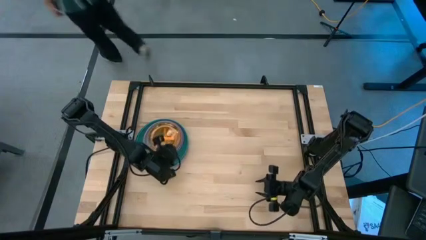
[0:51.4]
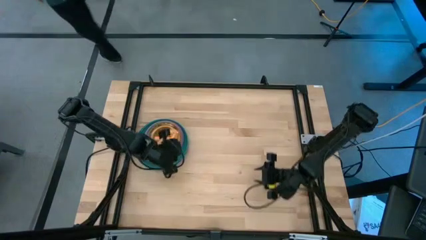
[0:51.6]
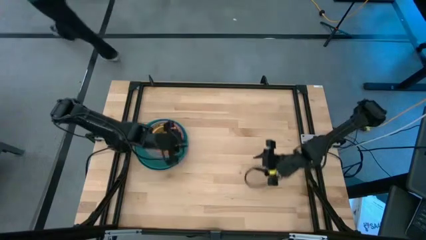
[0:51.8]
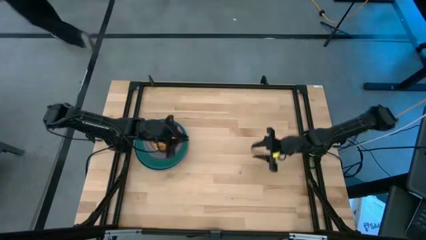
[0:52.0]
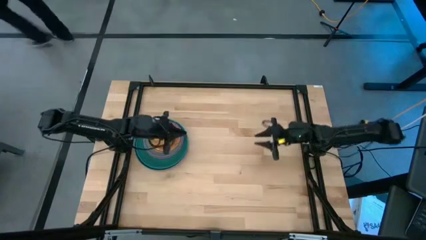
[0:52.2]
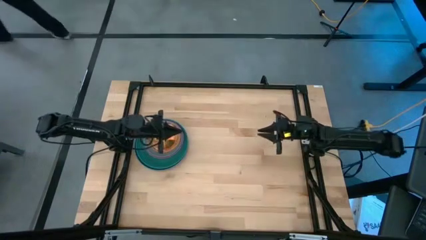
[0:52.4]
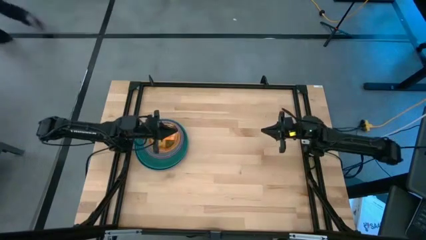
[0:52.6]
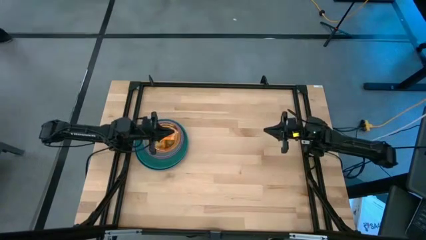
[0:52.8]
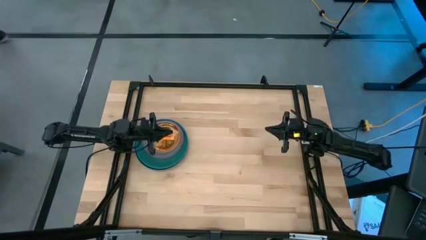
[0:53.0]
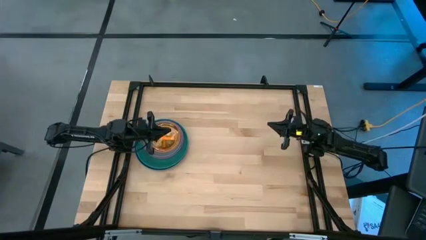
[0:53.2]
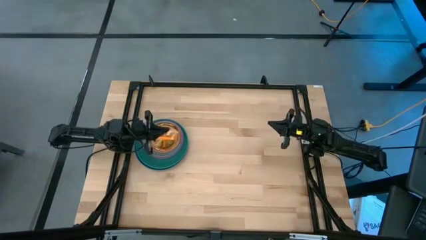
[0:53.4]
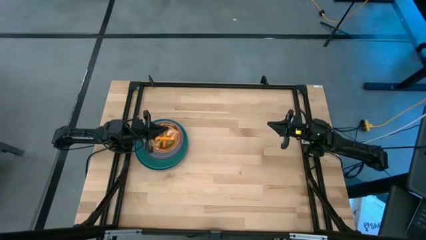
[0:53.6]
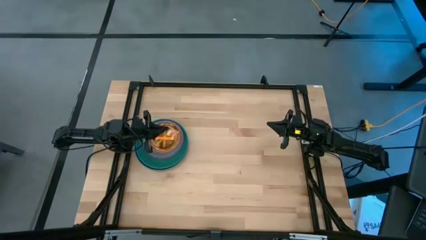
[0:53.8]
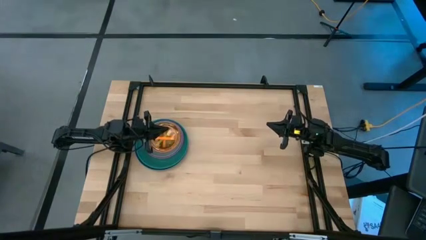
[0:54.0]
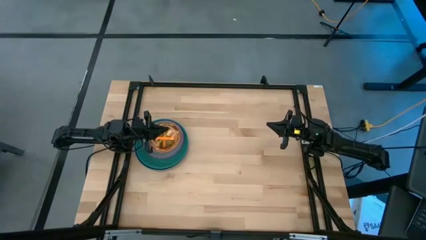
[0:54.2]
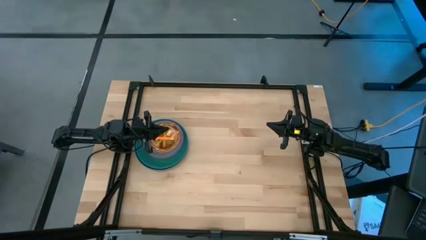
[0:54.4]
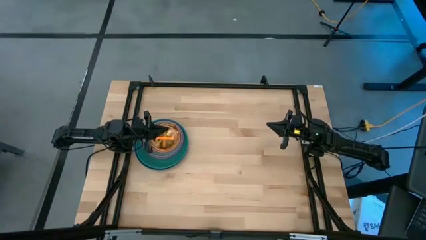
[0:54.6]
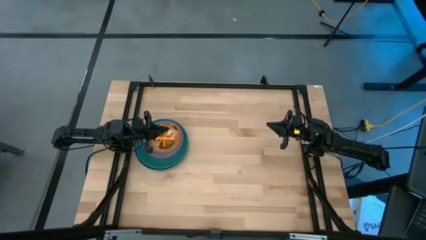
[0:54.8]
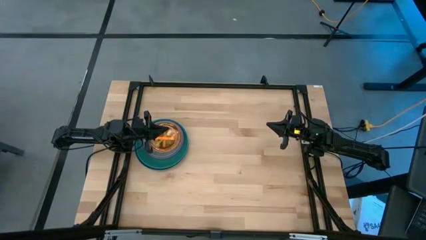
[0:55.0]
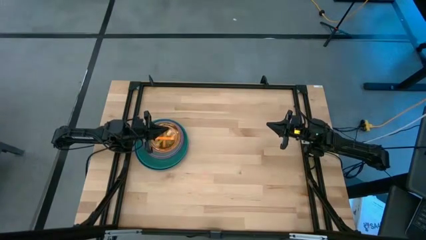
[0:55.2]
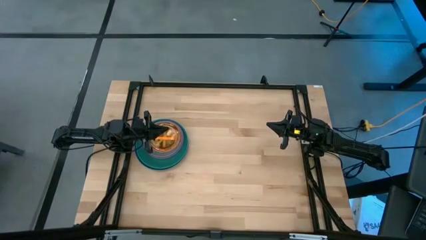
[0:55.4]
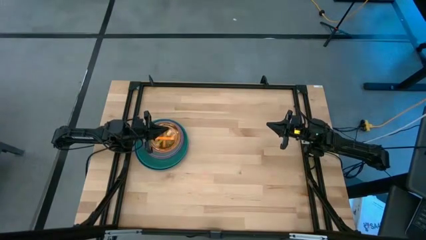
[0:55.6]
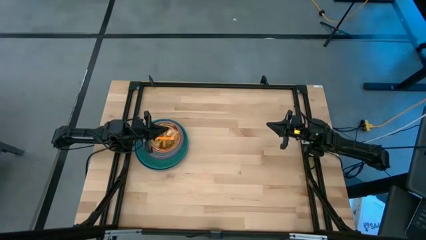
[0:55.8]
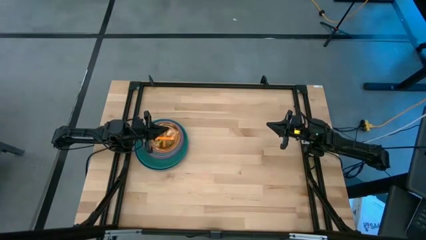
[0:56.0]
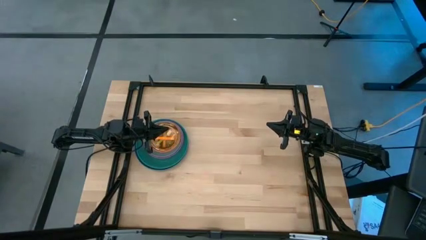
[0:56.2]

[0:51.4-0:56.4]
Task: Stack plastic plates
Return to Home Position

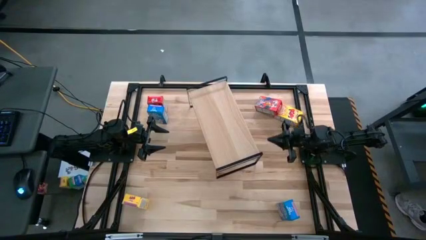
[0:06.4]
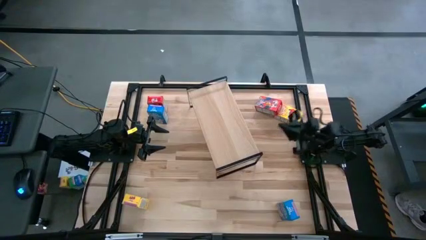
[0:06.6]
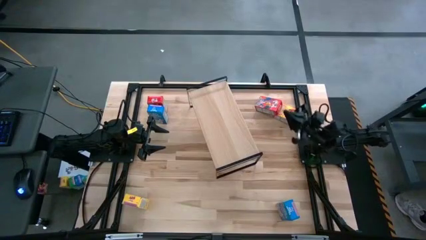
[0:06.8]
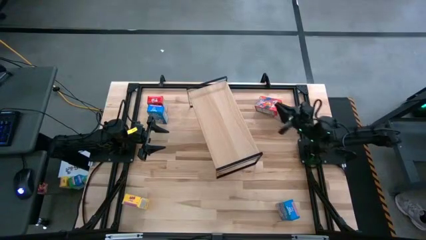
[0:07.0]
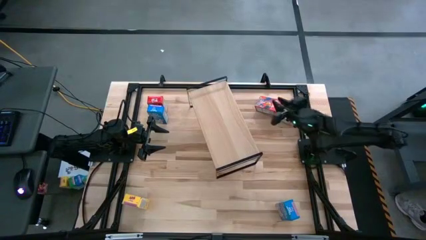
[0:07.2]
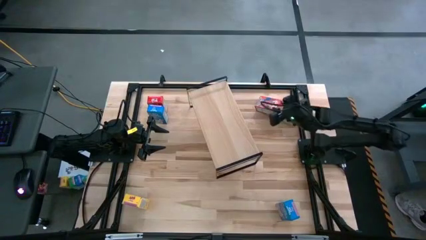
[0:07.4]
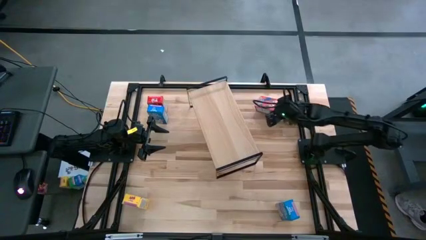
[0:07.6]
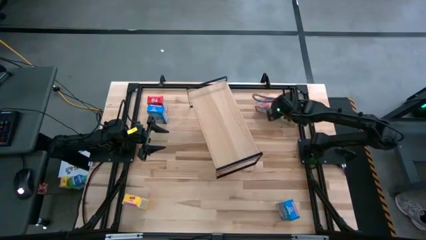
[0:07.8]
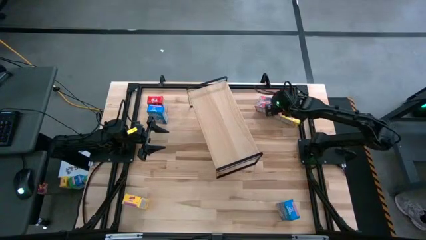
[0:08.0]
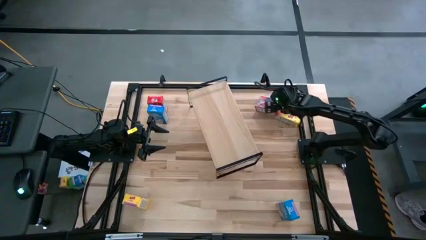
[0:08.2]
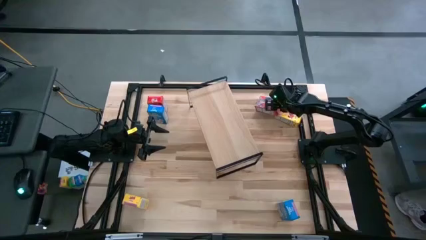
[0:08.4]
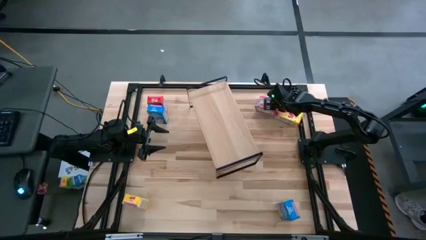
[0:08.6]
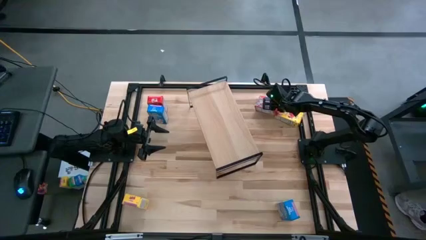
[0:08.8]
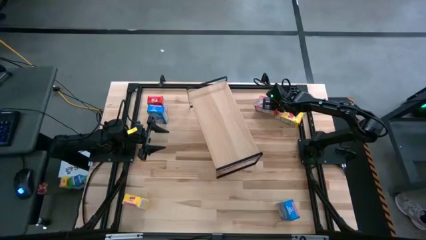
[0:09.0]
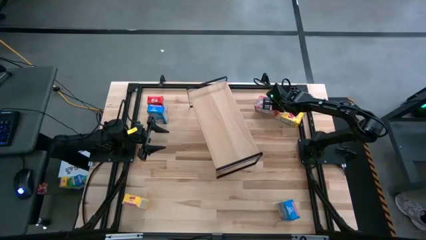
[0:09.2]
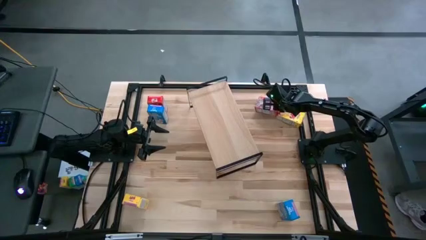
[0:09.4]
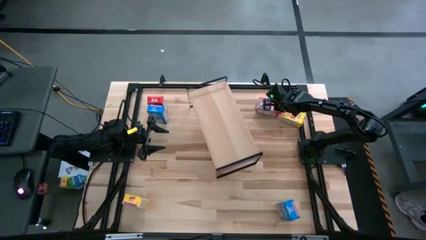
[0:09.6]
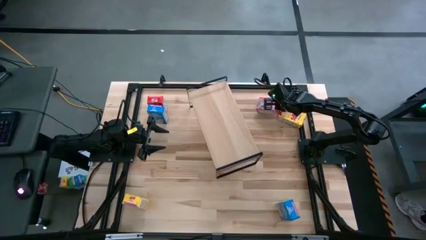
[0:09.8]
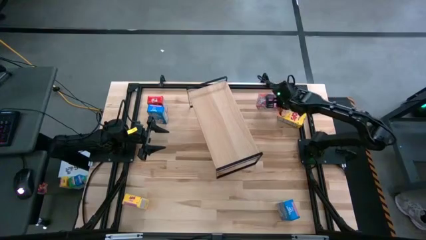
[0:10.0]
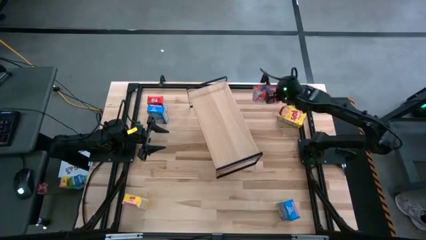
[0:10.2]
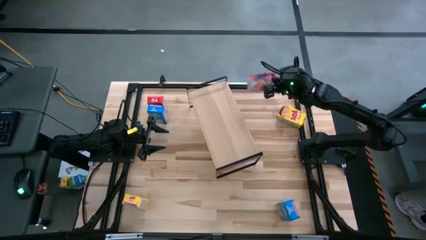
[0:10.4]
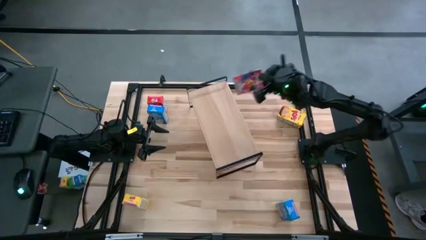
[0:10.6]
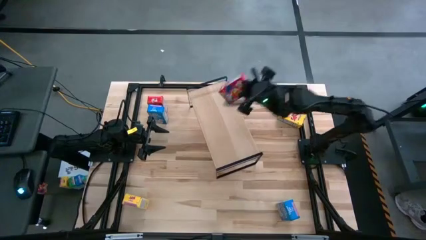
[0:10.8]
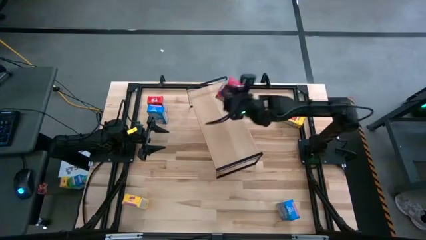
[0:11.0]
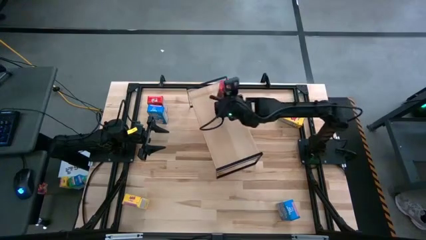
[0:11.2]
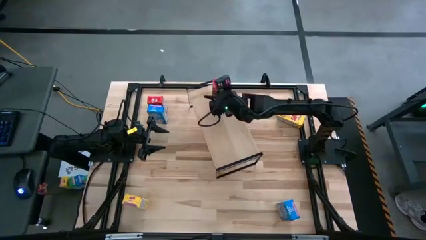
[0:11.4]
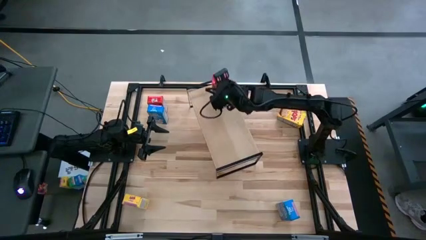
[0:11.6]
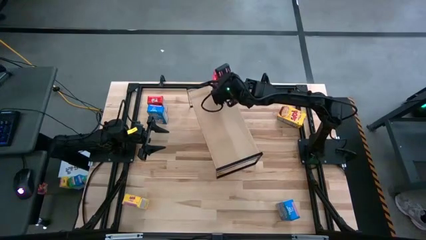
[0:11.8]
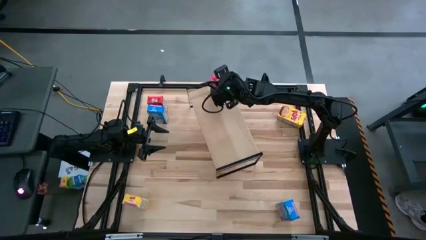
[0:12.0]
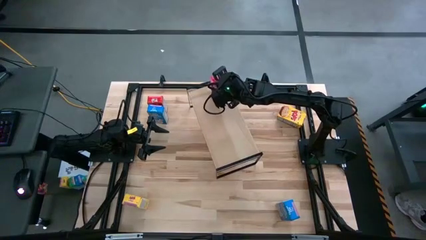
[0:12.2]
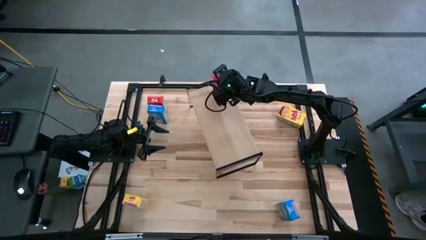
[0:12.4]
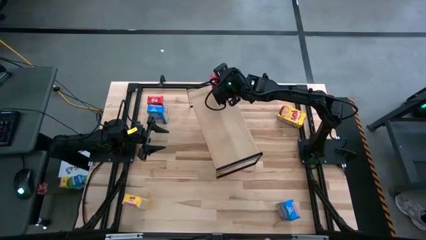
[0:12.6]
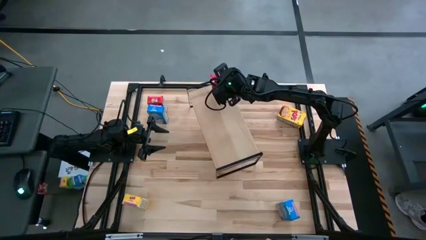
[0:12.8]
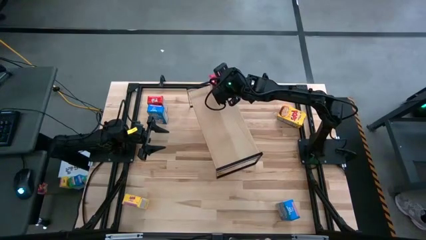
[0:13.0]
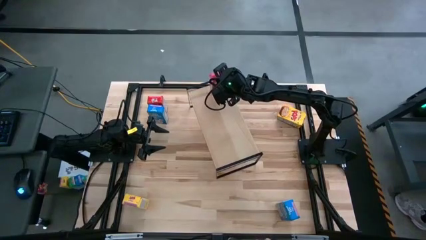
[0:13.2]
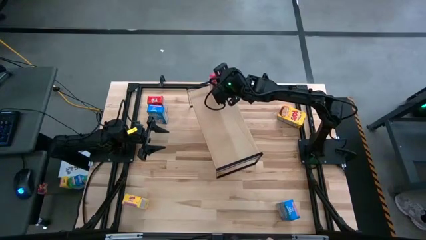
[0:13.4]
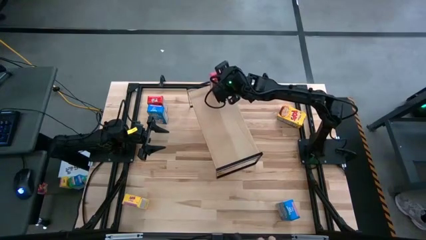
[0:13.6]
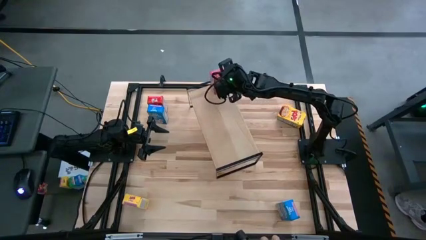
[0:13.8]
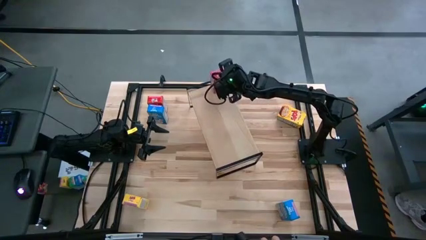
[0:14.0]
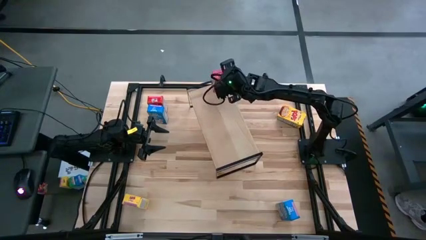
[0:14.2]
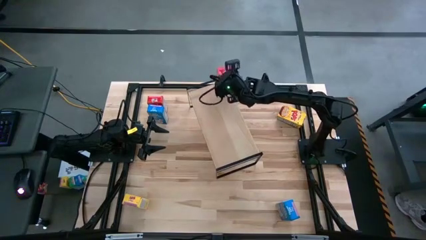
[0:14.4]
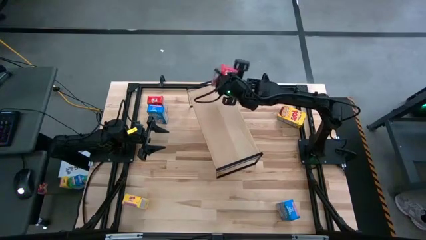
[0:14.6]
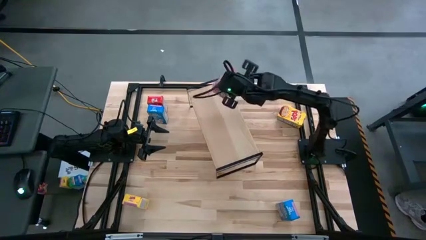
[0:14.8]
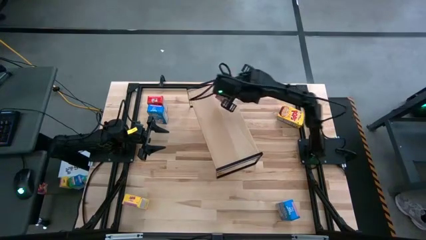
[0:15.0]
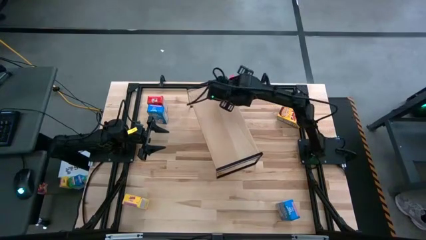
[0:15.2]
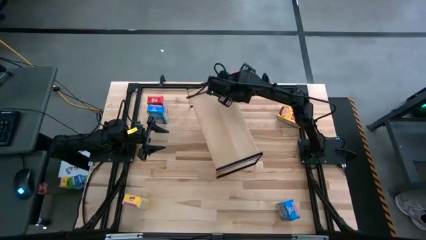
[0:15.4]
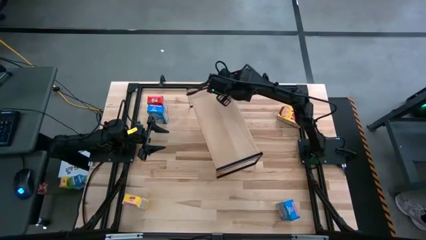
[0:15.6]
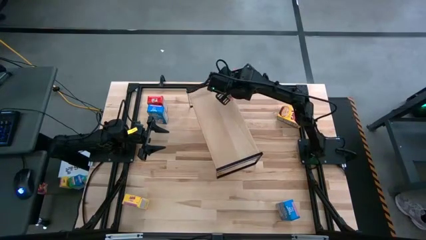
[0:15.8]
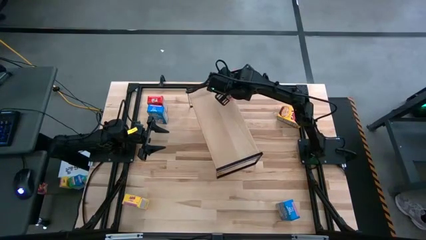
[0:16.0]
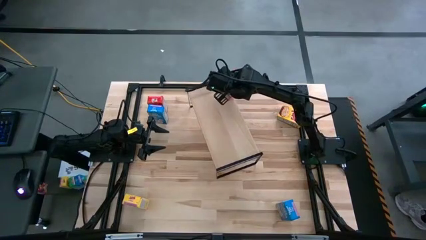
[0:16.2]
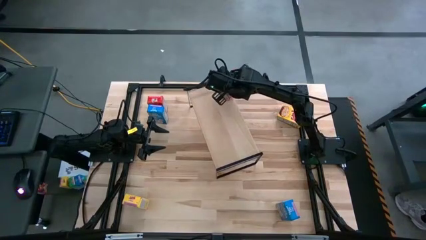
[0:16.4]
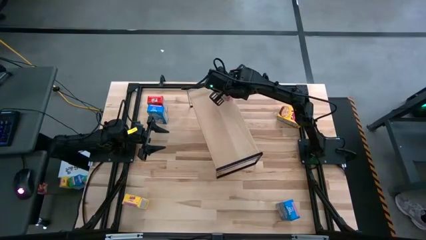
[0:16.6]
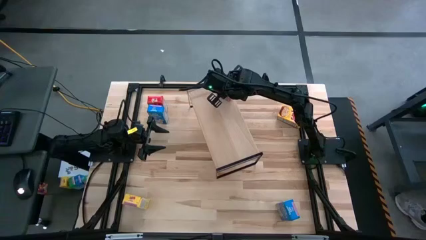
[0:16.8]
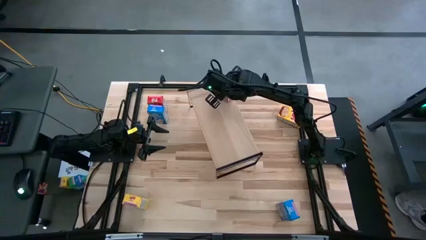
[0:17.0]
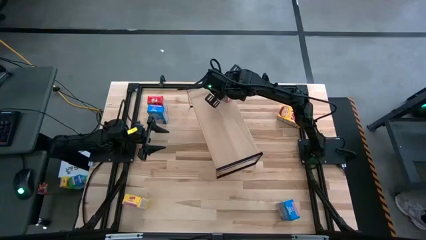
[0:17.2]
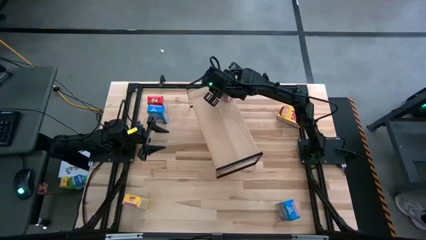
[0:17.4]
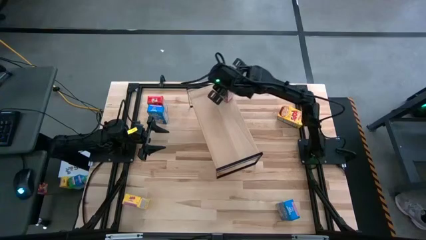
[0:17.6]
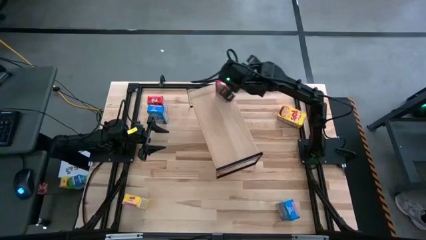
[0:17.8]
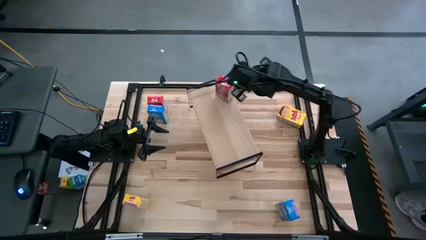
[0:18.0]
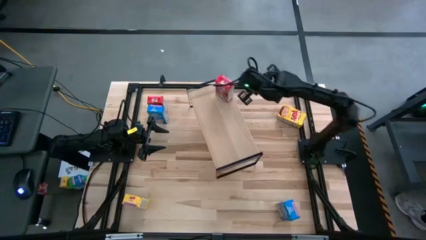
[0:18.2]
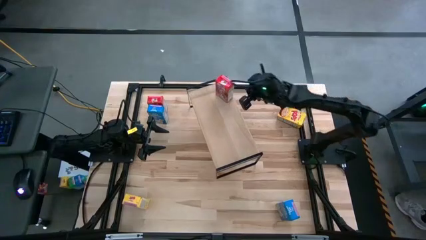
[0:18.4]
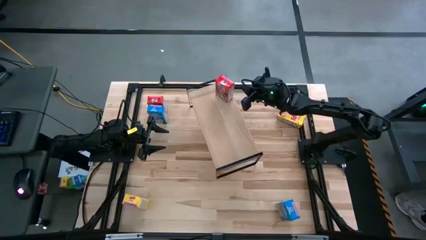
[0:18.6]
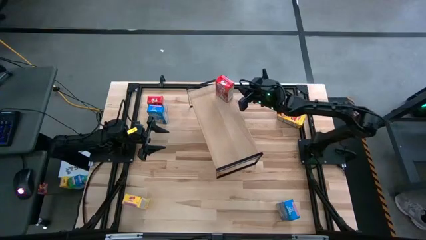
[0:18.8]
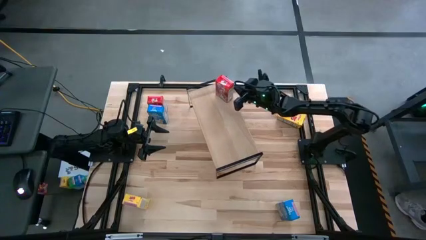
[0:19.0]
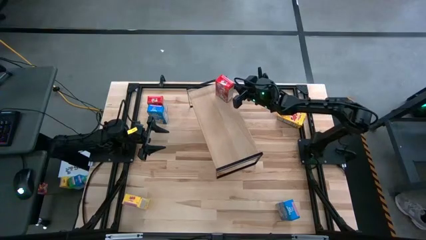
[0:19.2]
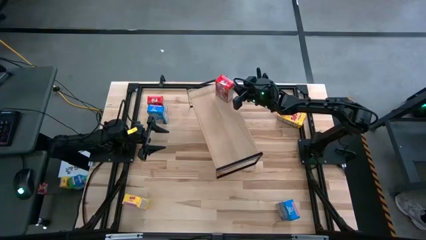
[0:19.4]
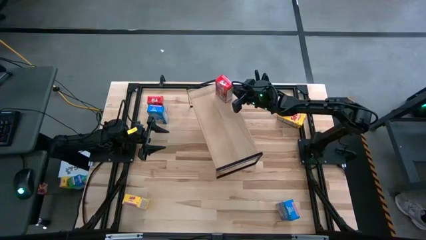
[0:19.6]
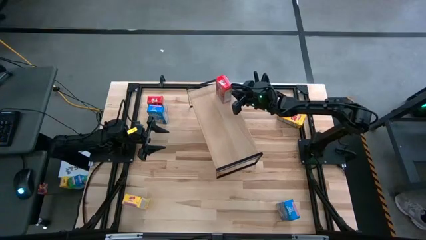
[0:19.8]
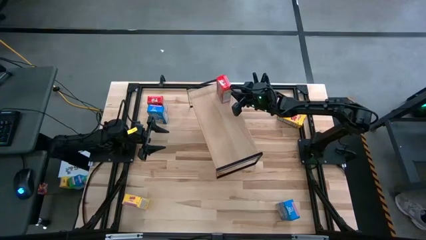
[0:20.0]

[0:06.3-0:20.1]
Task: Stack cereal on shelf
Put the right red cereal box on the shelf
